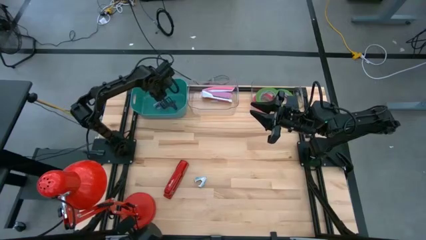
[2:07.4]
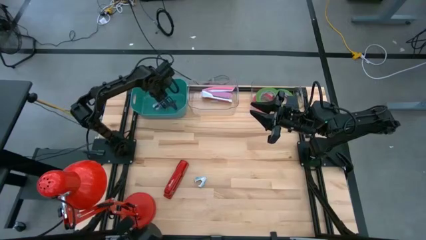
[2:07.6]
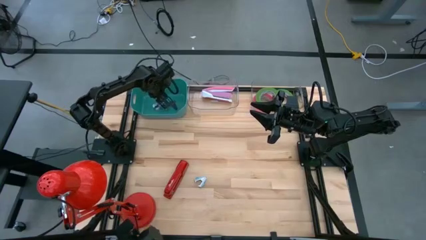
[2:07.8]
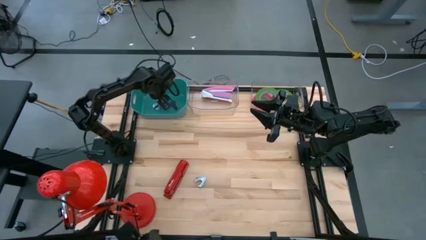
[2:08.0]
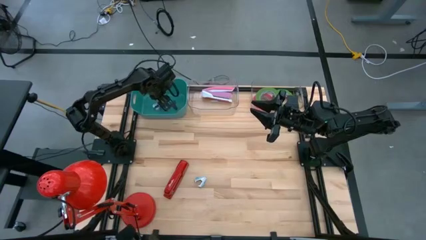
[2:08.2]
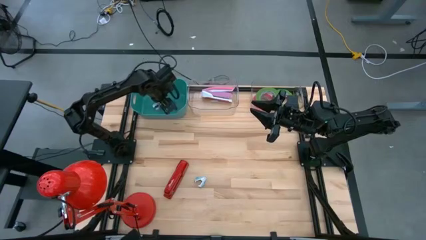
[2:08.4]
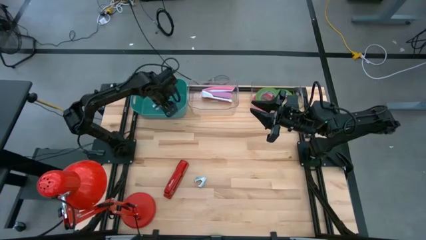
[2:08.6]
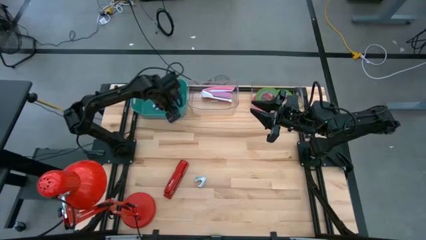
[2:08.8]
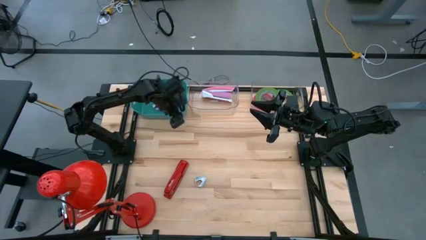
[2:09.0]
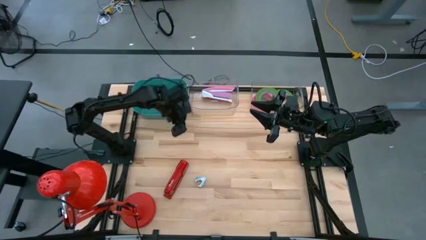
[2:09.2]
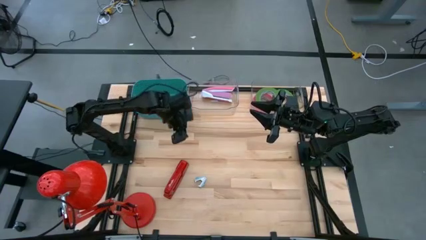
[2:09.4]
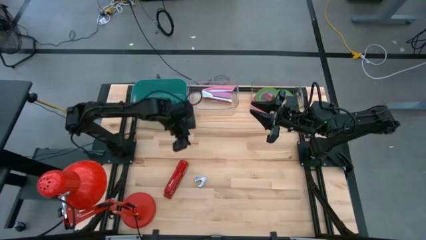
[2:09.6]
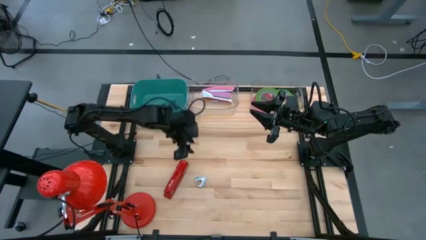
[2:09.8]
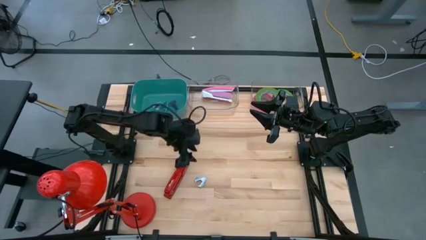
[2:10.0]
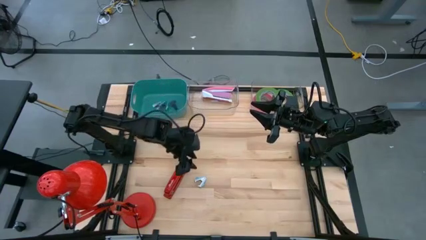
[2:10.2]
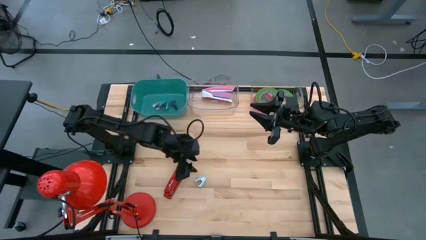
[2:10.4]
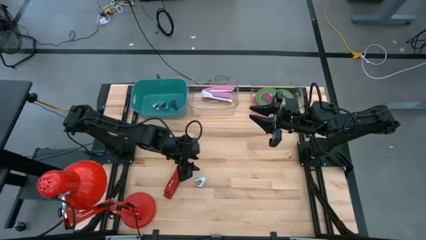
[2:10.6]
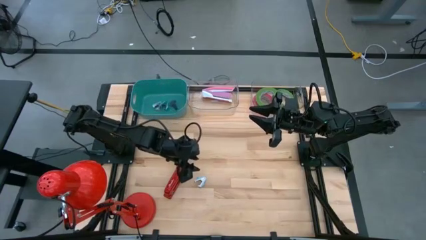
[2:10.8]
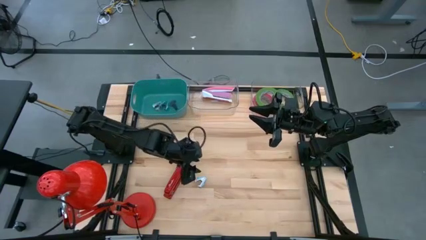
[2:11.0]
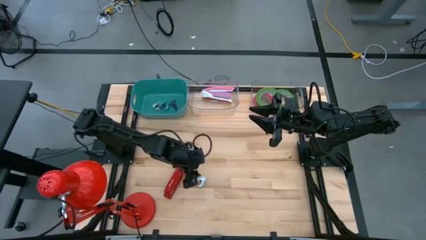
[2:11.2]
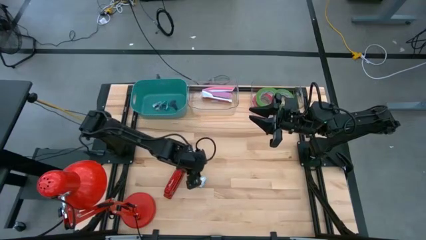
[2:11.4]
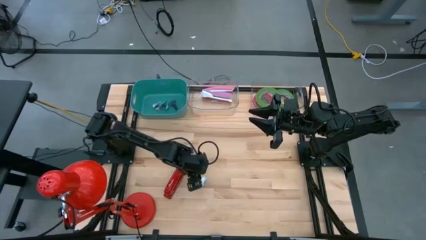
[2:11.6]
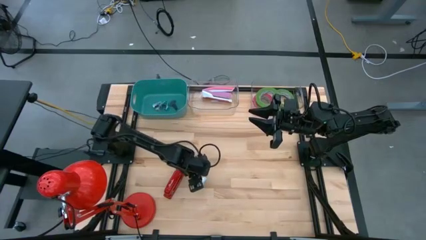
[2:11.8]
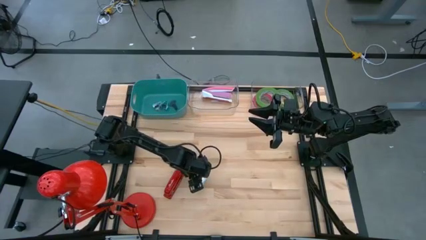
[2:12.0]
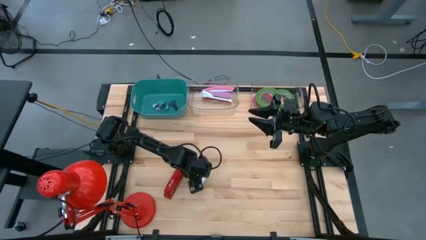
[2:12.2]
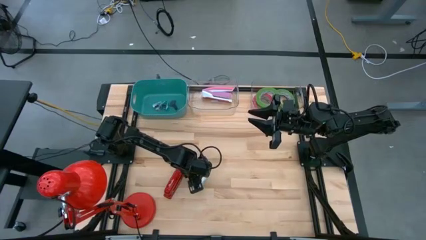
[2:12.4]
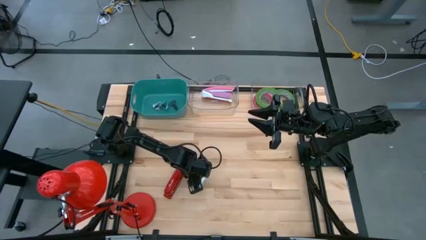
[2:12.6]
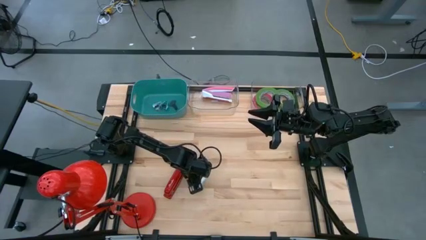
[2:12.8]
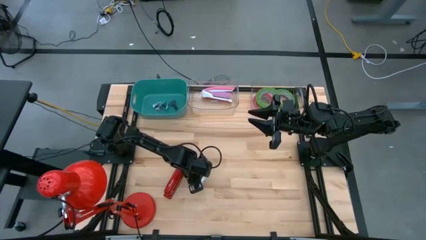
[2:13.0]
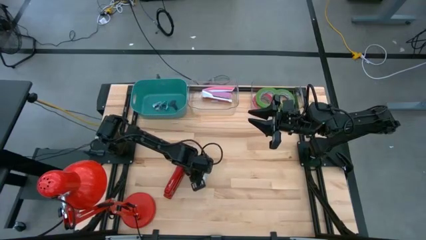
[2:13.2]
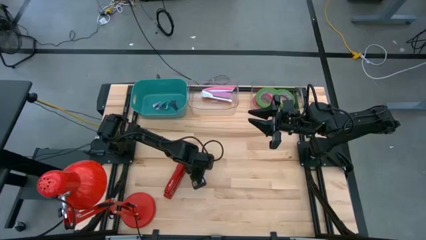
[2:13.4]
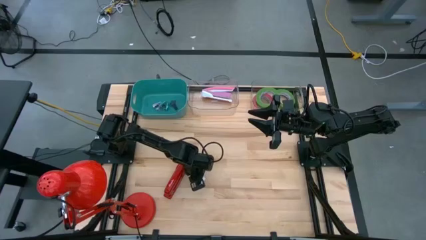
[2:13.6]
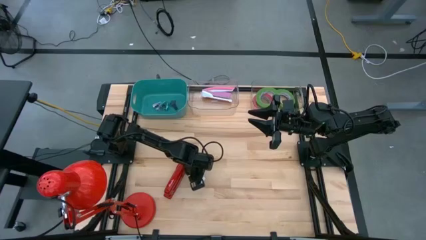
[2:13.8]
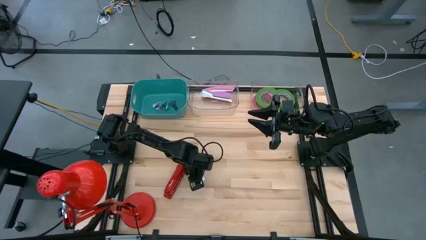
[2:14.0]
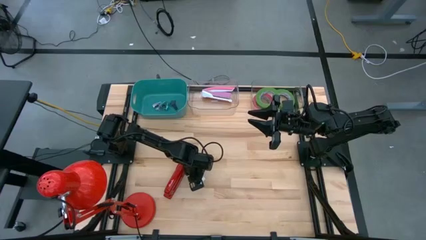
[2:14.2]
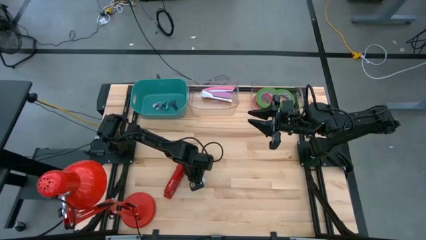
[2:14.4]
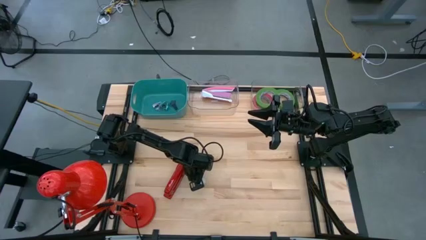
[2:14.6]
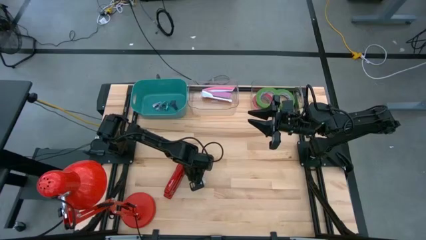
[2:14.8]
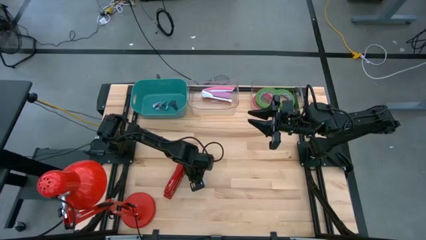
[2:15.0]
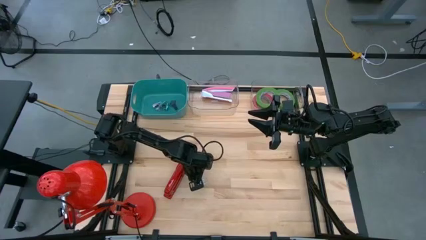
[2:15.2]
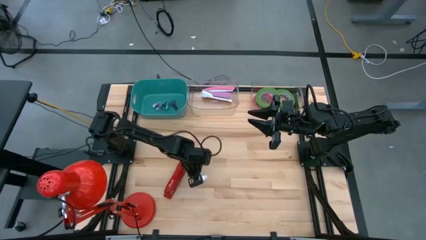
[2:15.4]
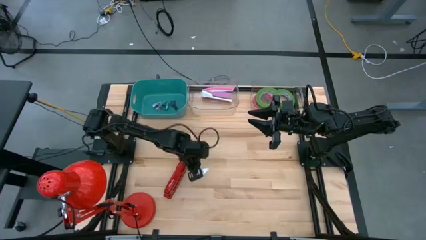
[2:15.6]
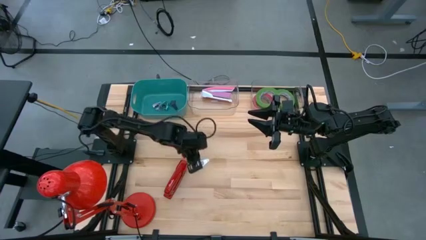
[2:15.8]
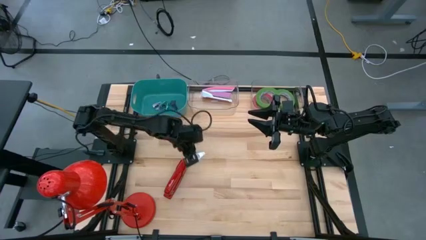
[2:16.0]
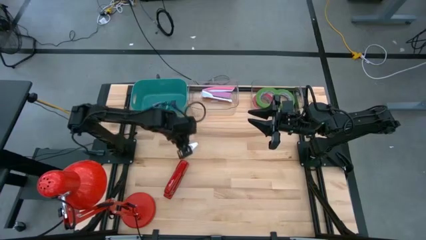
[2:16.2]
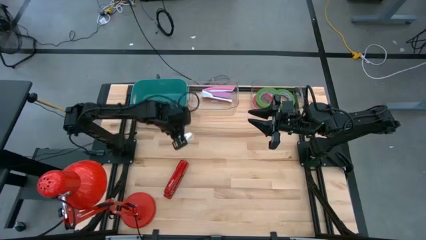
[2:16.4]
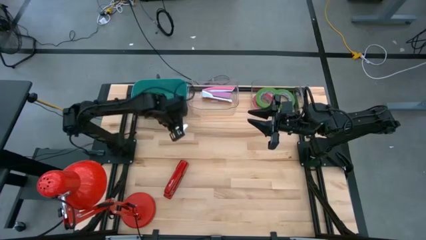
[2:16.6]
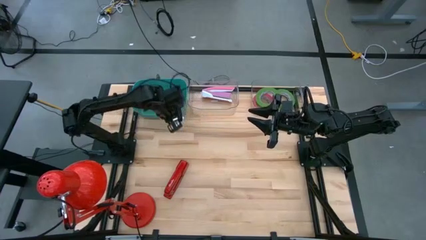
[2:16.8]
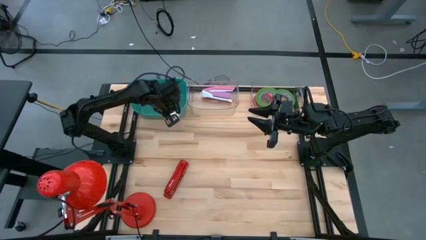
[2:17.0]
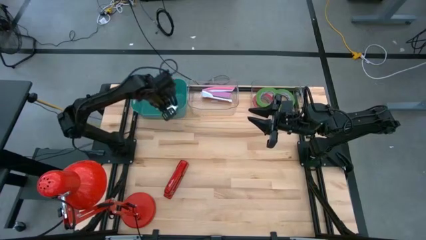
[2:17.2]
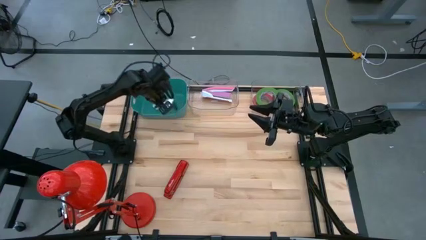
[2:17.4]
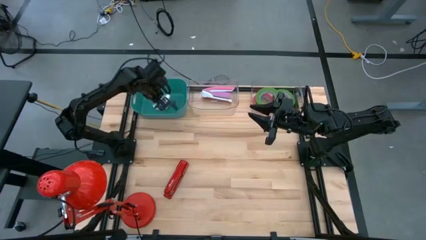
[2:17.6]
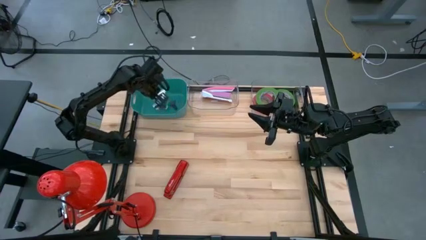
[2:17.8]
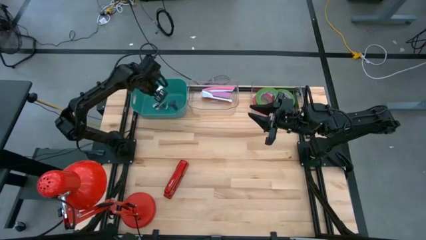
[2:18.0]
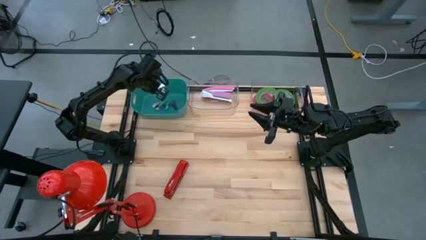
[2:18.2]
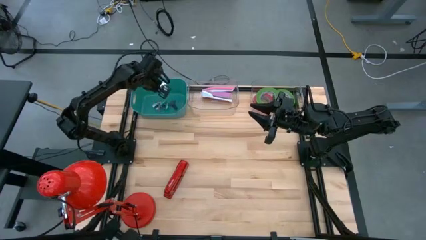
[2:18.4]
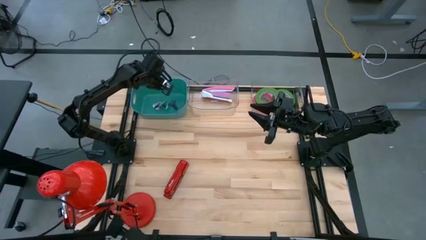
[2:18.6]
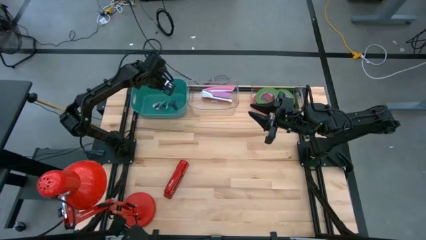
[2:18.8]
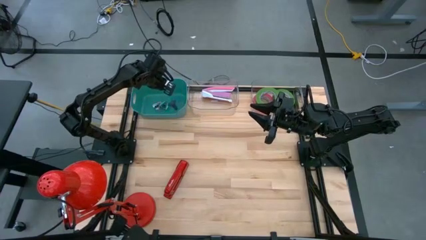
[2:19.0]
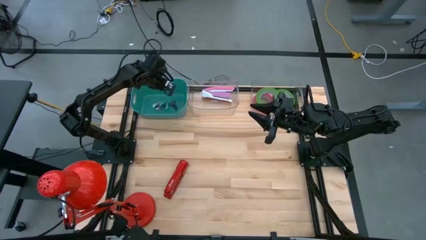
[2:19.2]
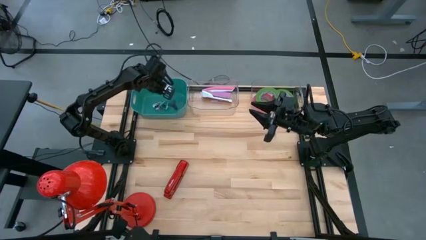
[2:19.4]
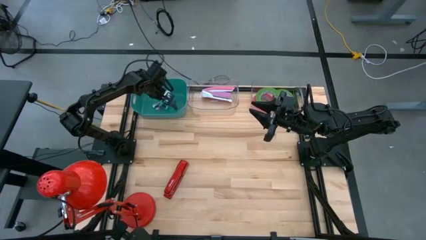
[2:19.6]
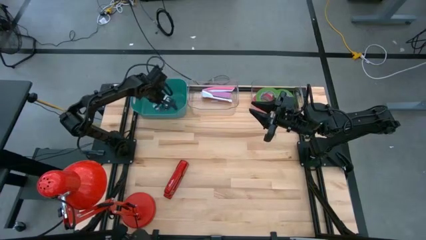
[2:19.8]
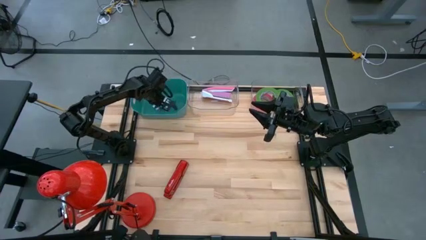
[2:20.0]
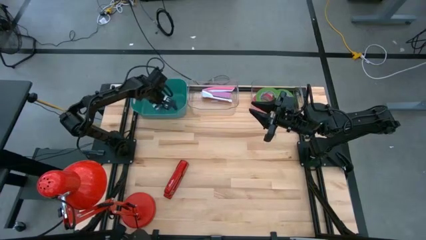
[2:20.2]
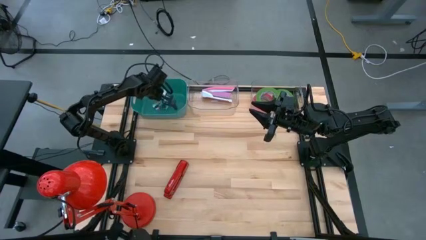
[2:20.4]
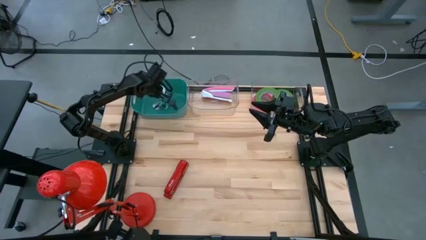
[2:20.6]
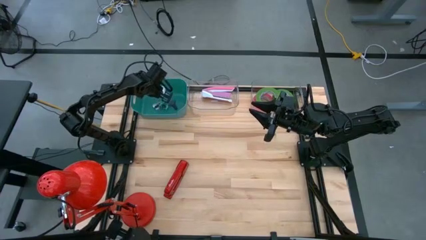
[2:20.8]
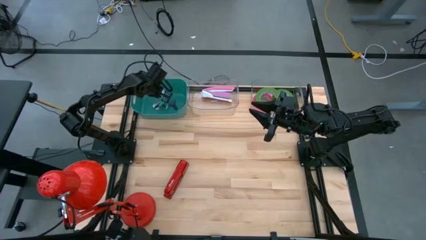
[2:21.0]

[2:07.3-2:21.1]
Task: Pick and place Stapler, Stapler remover, tape
Put the blue staple remover into the blue bin

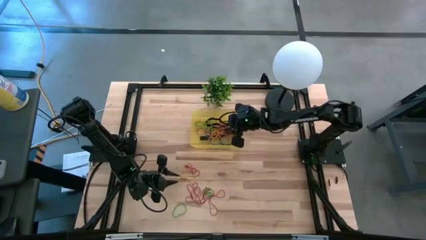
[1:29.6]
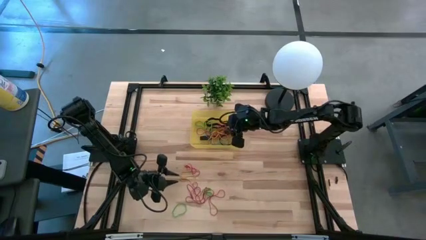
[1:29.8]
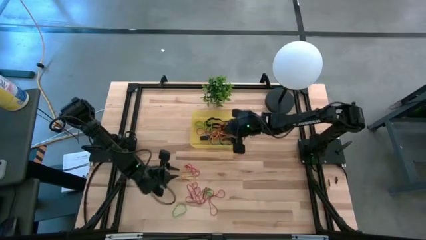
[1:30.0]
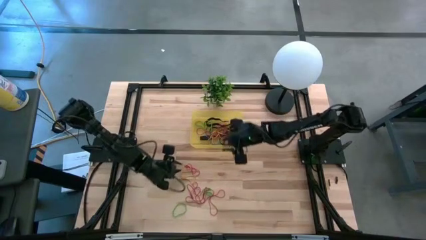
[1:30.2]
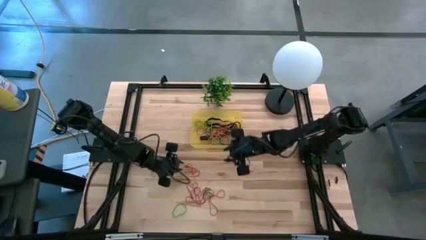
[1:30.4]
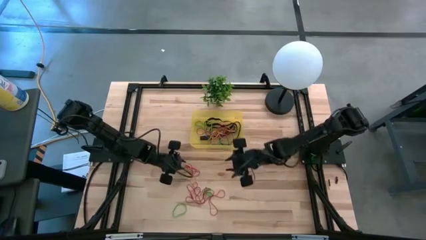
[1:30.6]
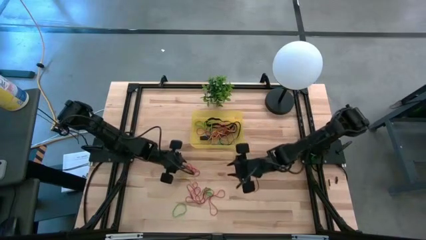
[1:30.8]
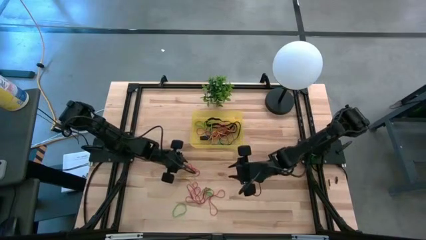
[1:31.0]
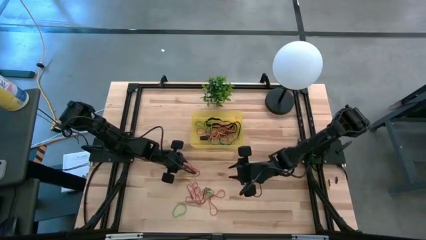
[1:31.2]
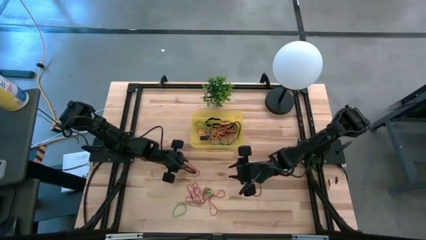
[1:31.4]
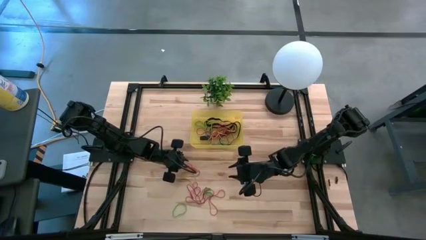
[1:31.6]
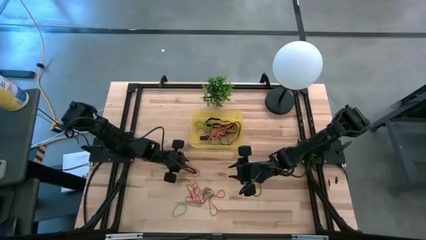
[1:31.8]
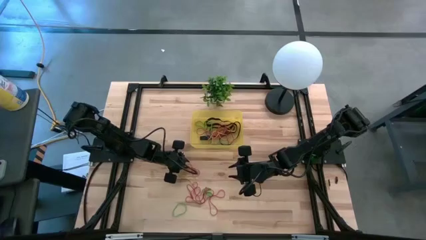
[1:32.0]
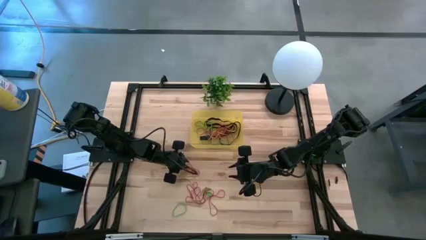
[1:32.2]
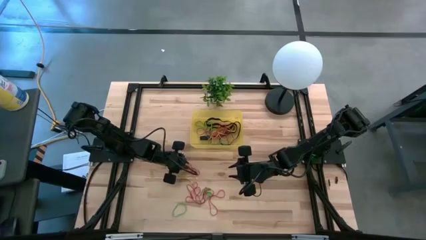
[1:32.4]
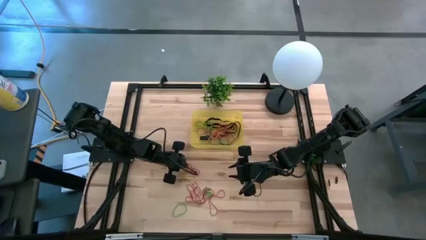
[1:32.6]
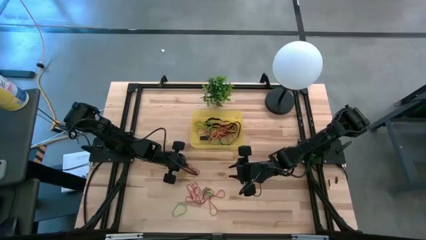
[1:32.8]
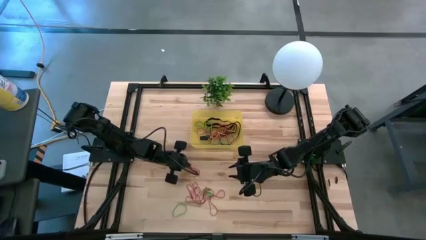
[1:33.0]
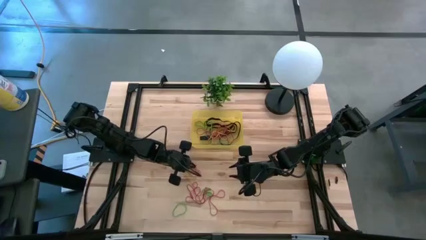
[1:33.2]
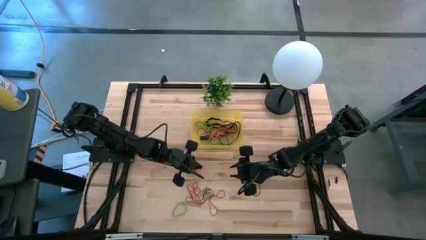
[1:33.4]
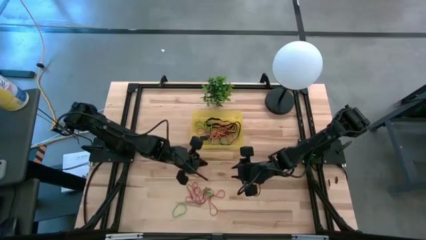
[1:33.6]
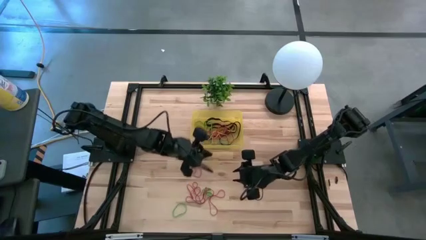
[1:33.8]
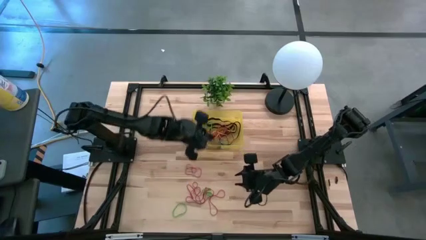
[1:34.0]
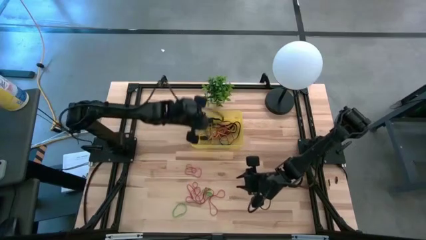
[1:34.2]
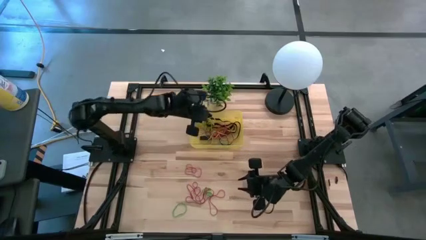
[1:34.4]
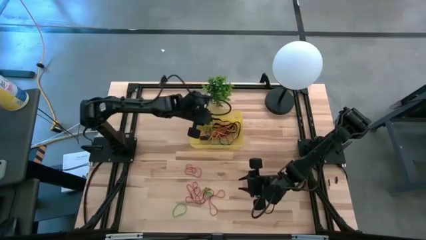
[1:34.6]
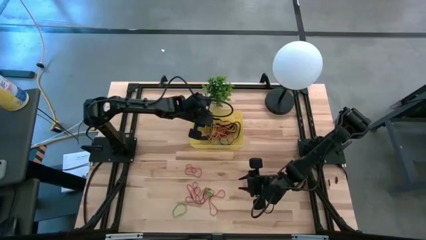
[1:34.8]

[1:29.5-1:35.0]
Task: Pick and place rubber bands into bin
Put the yellow rubber band into the yellow bin
